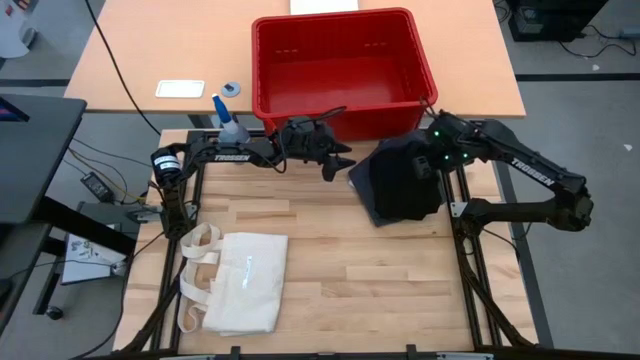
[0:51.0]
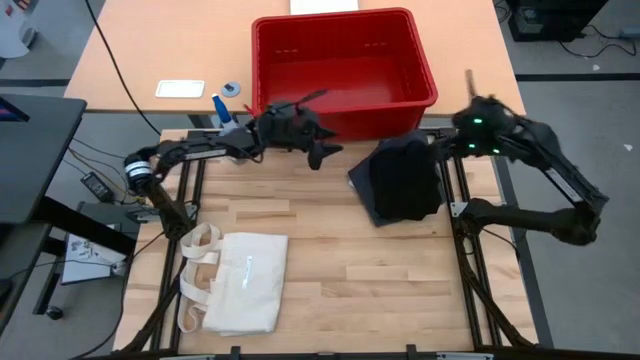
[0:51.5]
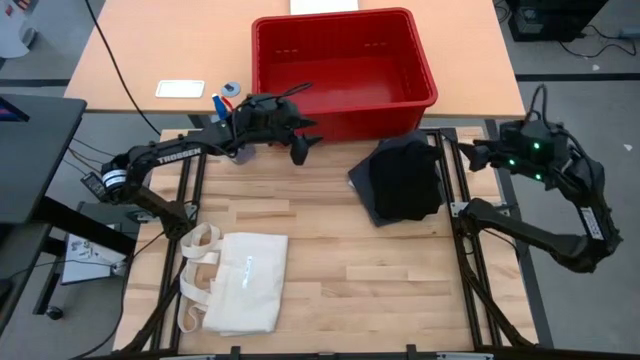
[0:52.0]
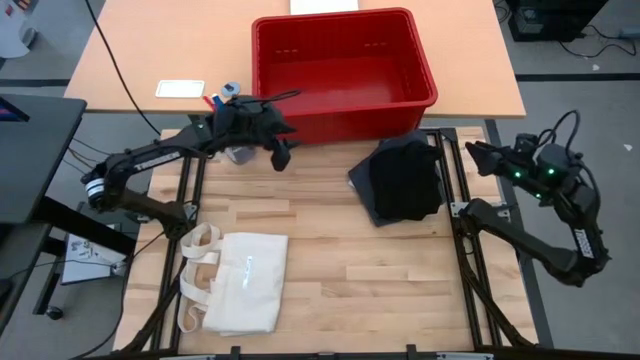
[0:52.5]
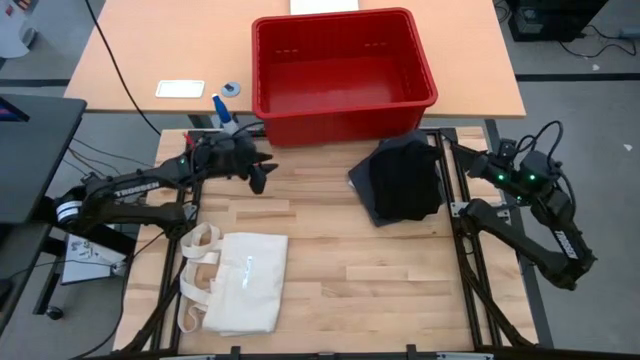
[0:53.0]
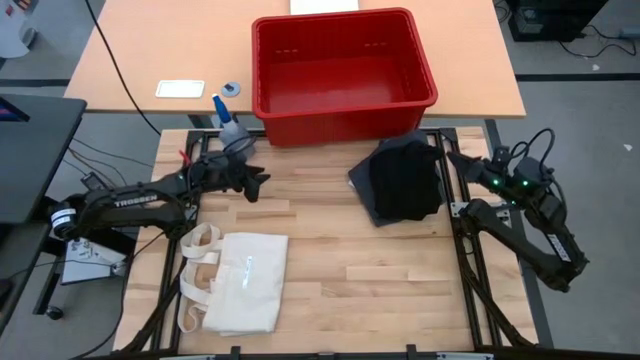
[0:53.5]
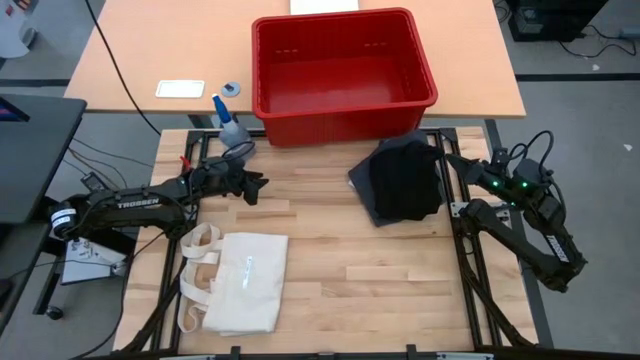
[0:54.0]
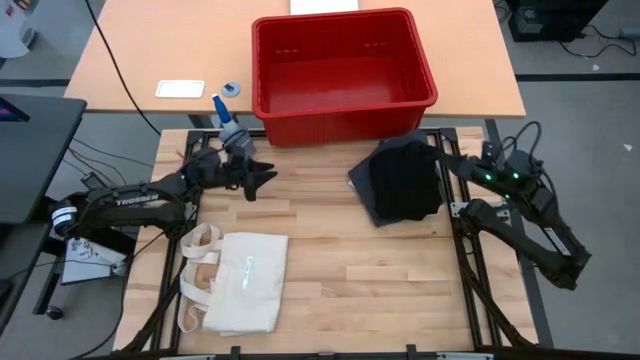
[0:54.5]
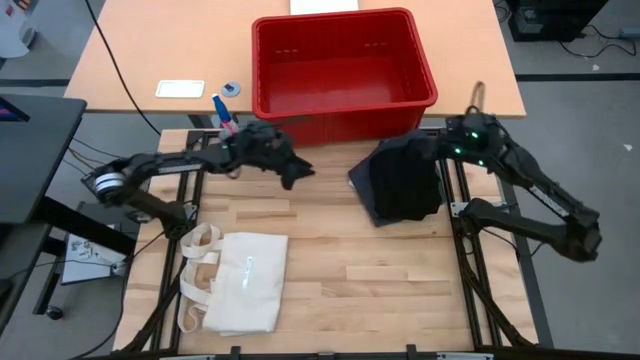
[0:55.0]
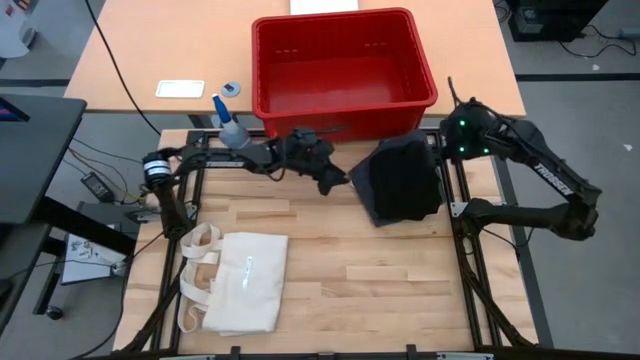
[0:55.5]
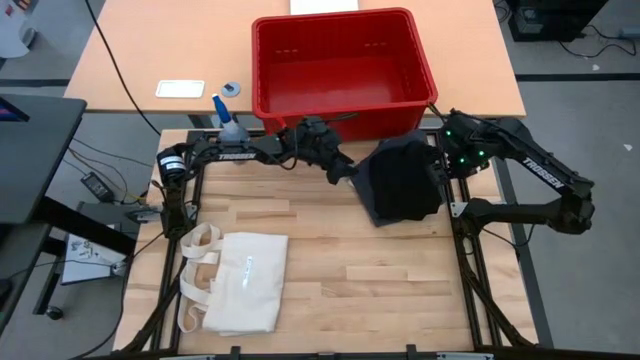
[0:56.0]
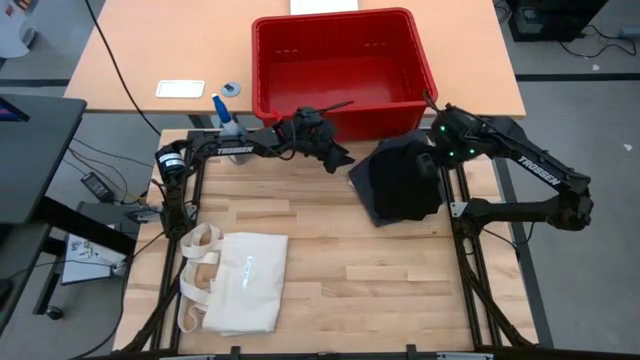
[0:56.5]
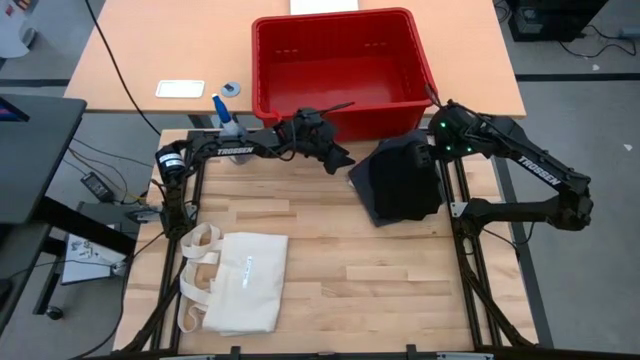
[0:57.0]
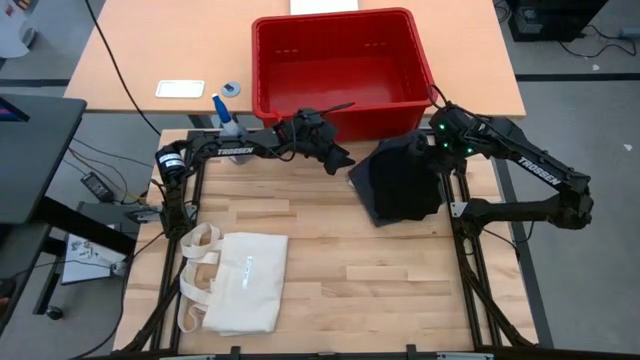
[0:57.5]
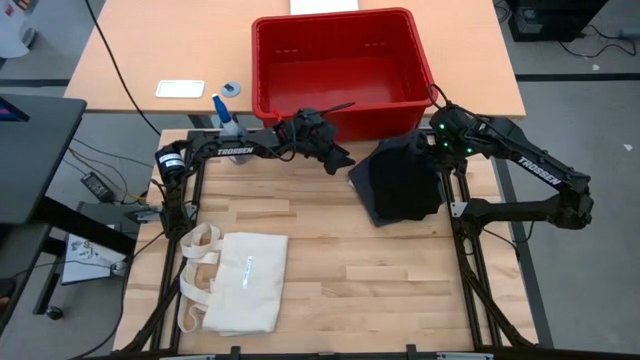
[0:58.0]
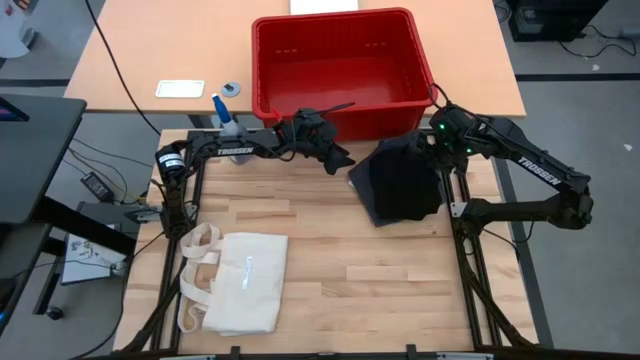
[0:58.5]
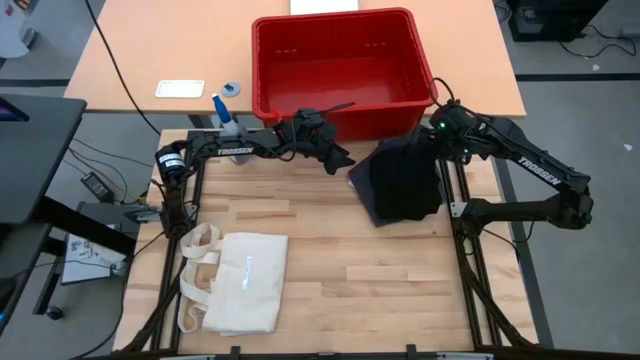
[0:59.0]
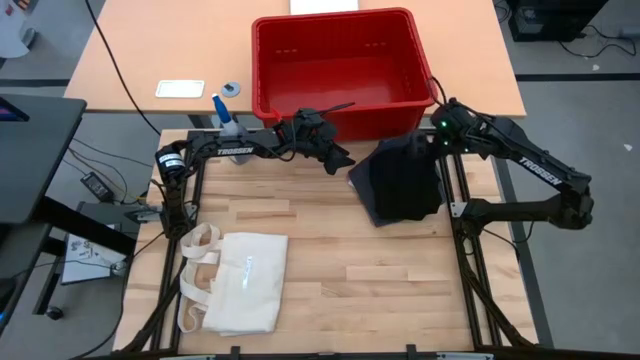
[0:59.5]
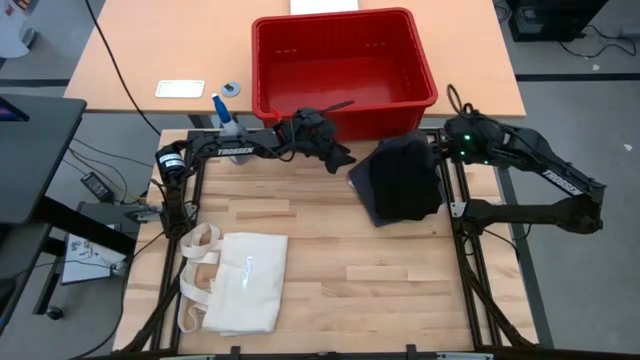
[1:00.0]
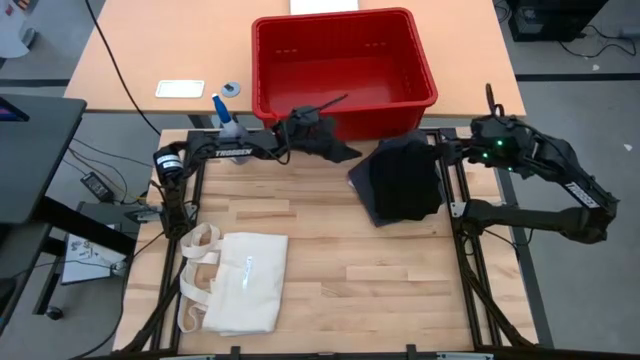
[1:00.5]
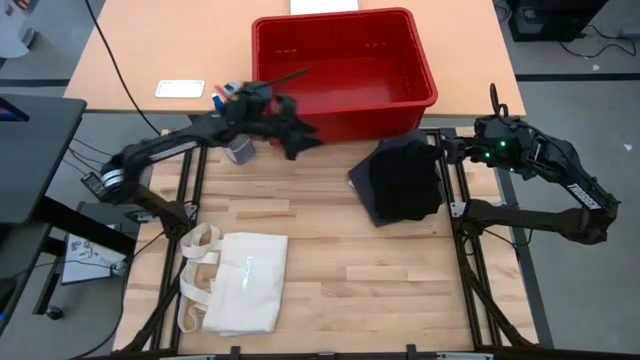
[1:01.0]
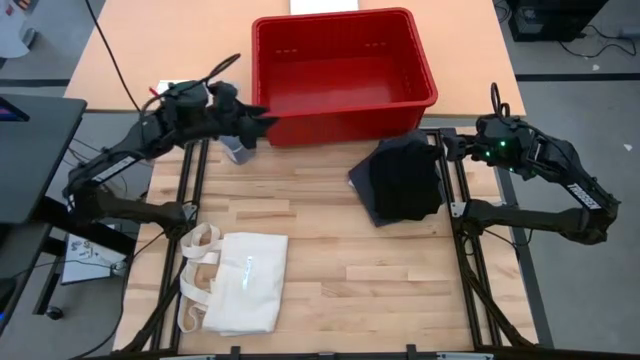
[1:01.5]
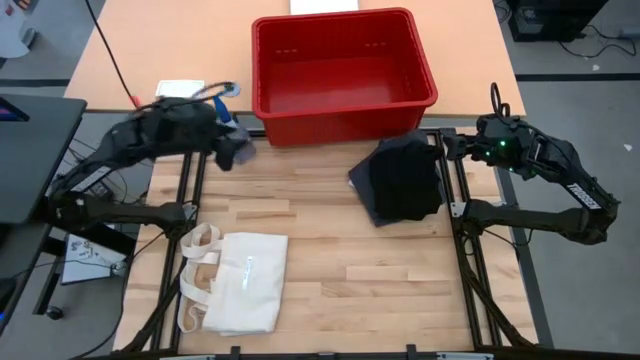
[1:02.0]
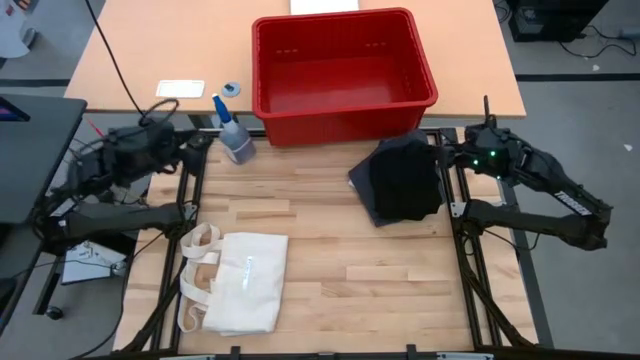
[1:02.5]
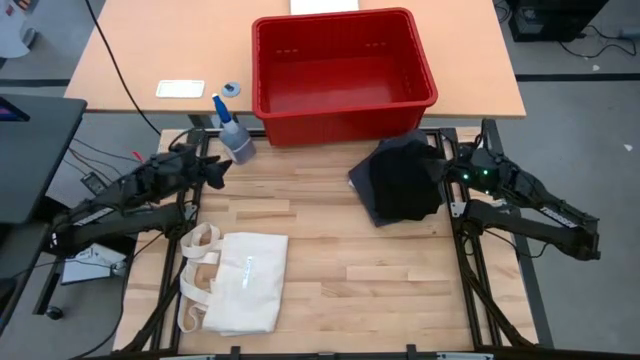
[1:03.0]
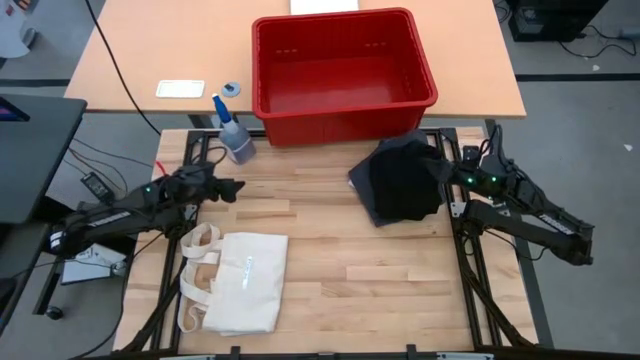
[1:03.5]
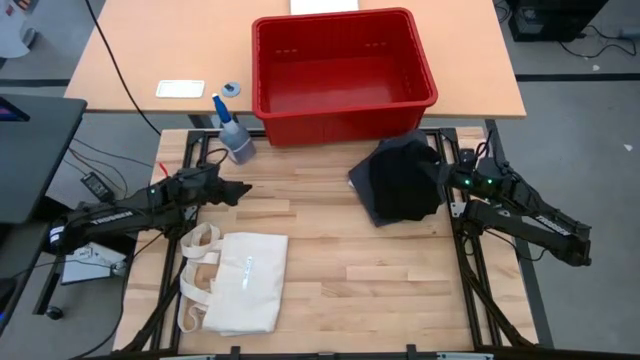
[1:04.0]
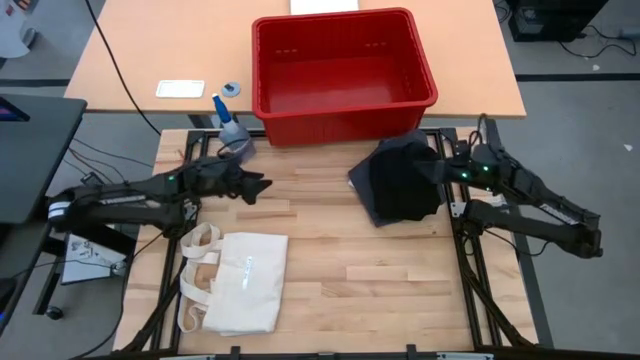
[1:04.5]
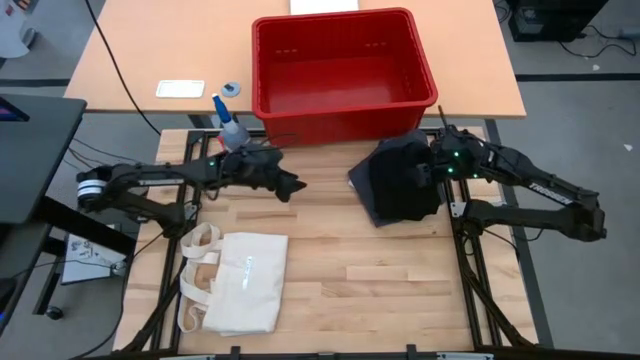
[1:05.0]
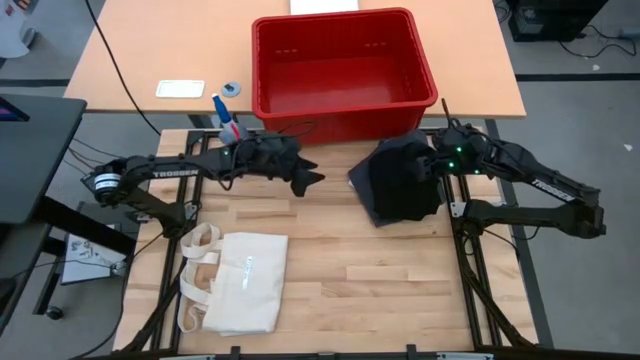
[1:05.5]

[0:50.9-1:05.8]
Task: Fold laundry
Put the folded black pants into the red bin

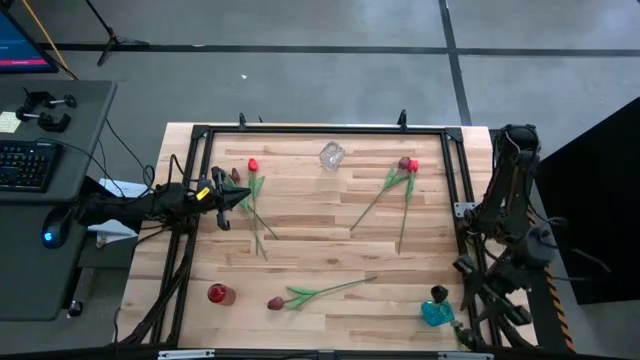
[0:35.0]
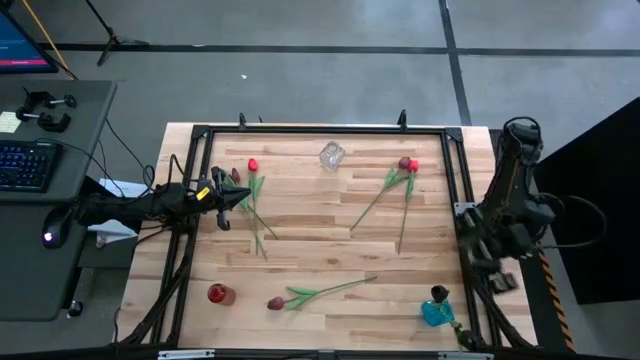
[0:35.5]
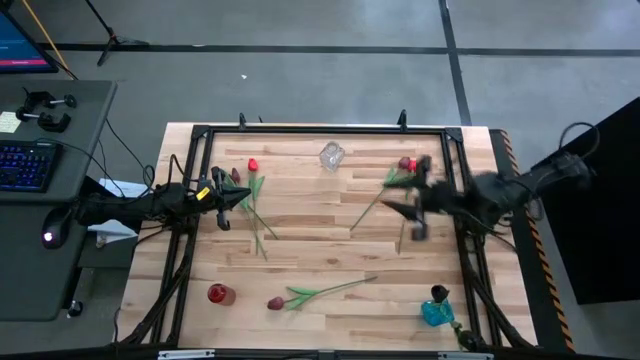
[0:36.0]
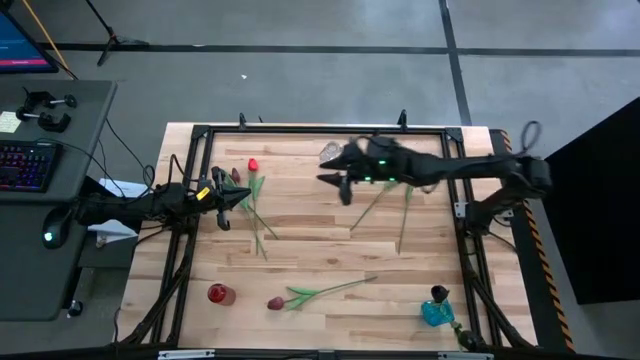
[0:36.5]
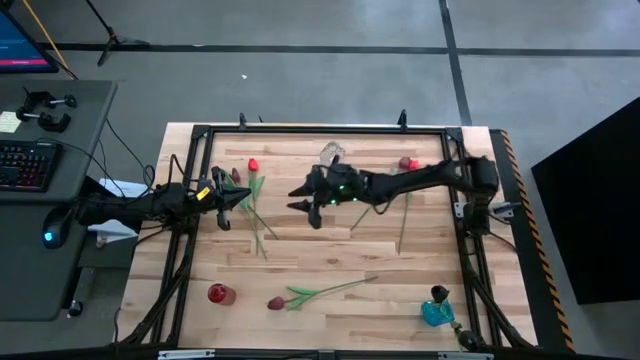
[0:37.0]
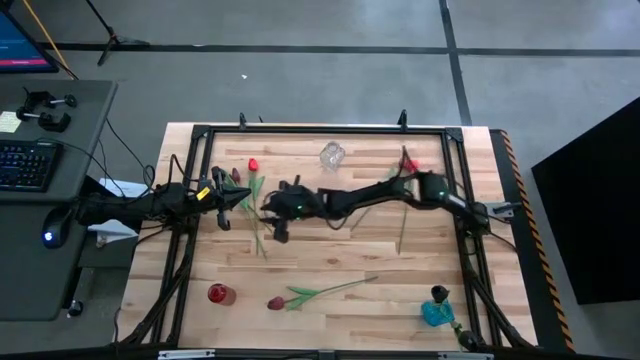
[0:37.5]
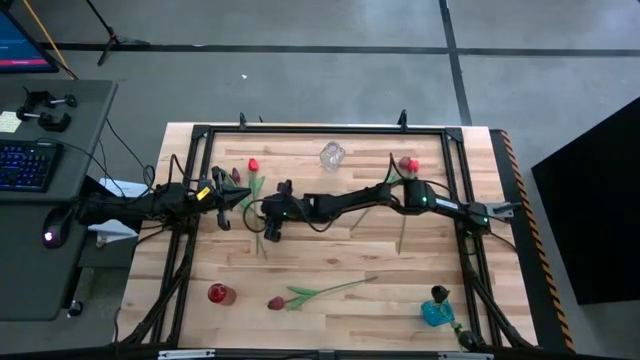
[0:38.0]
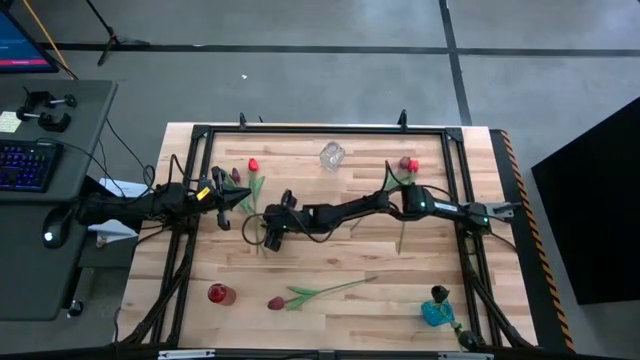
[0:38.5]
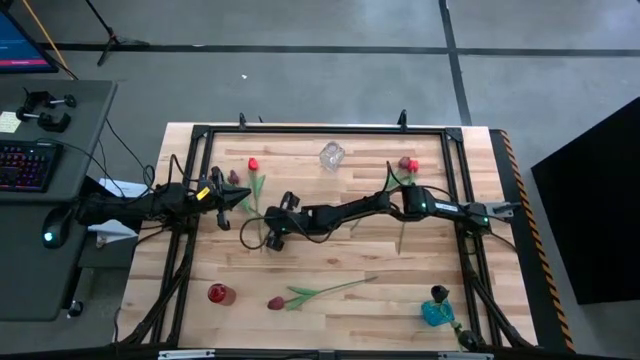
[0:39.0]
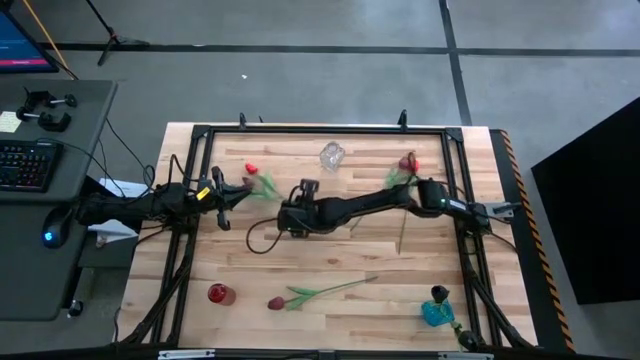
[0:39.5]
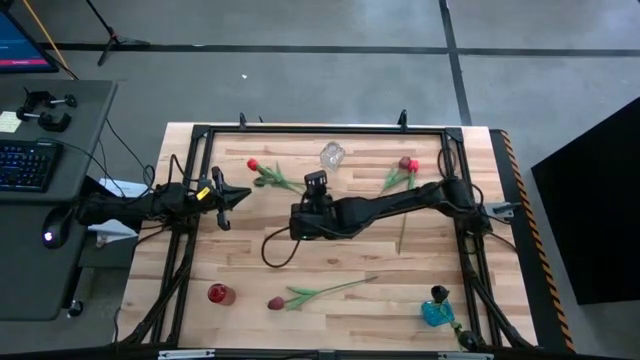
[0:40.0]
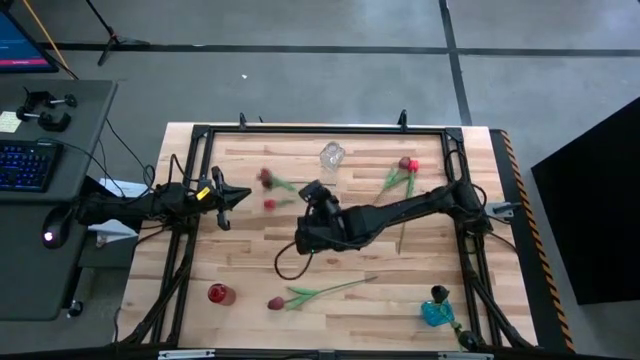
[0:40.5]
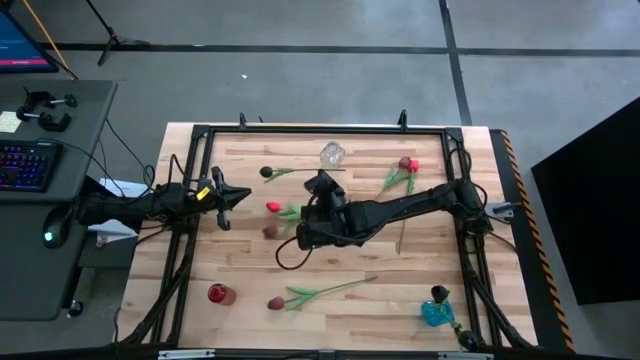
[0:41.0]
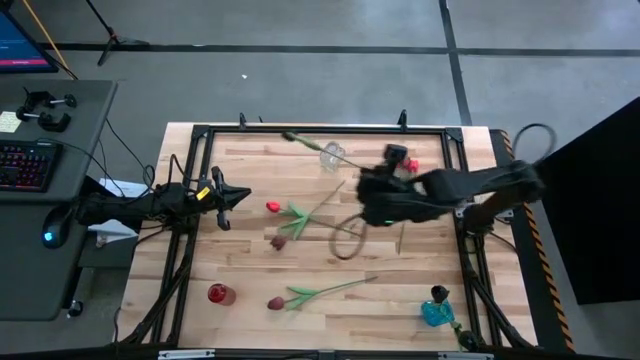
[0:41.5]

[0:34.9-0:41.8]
Task: Sort flowers into vase by color
Put the black flower into the blue vase
